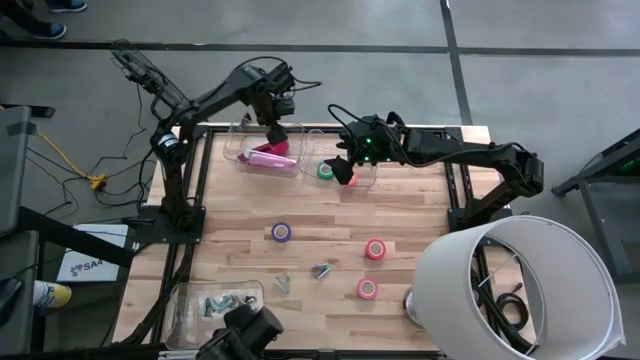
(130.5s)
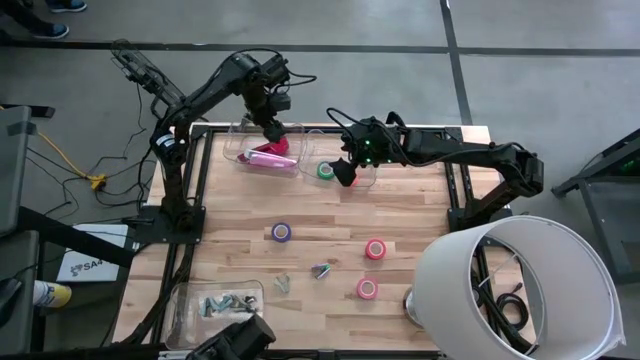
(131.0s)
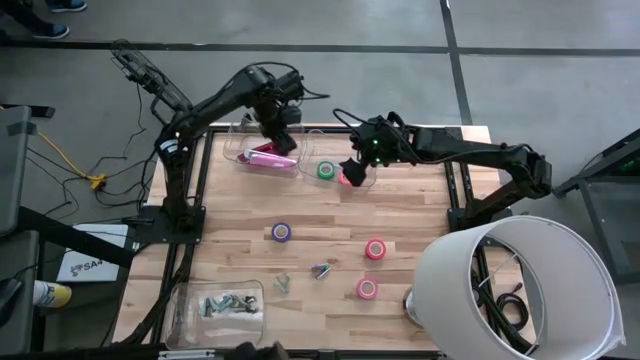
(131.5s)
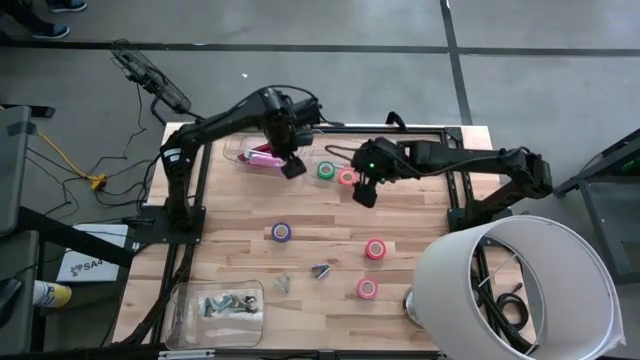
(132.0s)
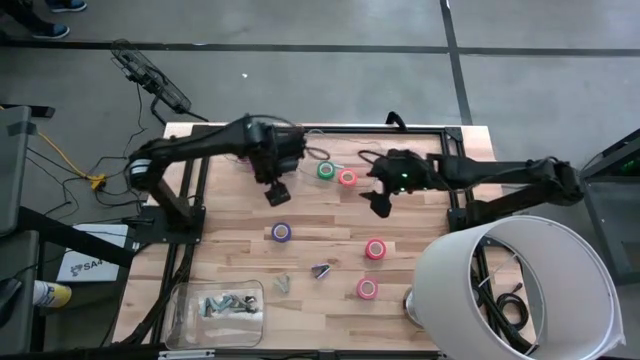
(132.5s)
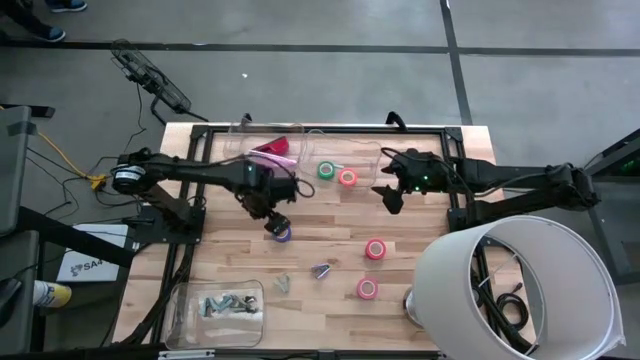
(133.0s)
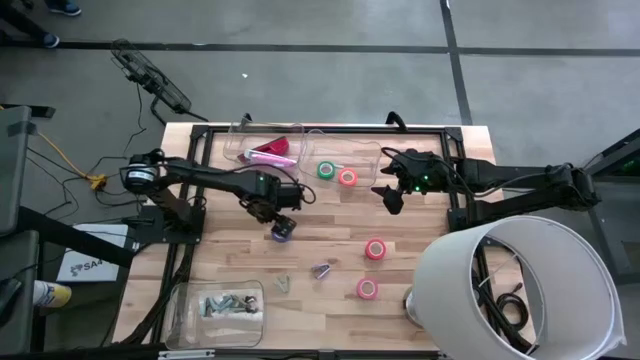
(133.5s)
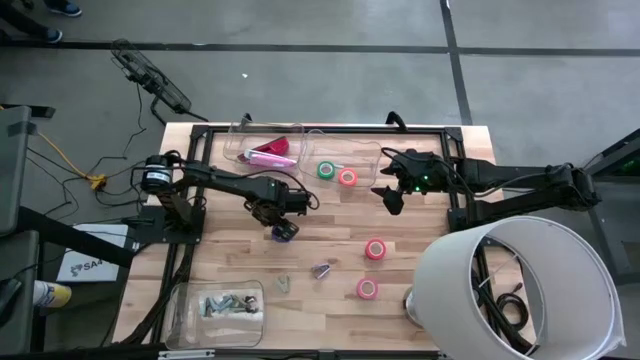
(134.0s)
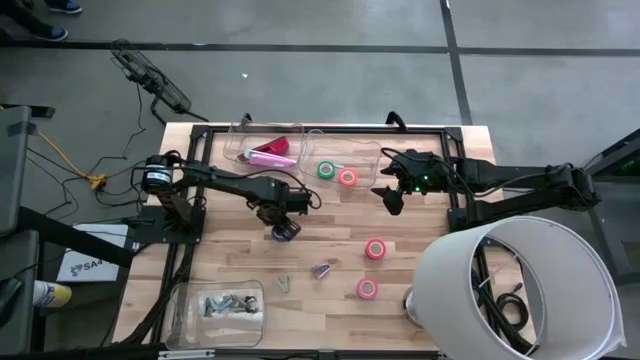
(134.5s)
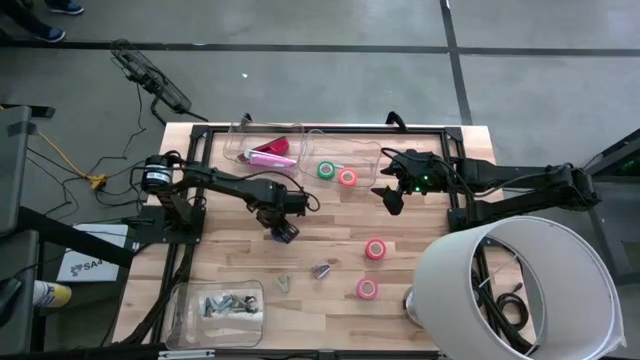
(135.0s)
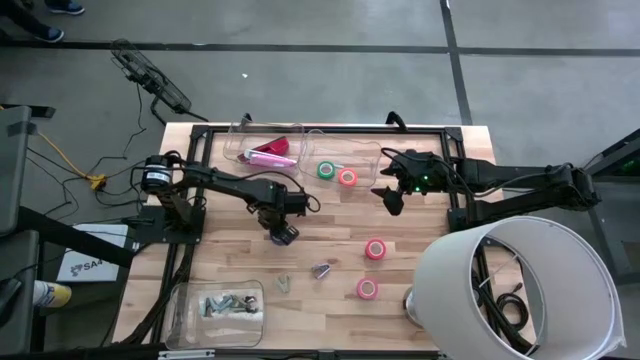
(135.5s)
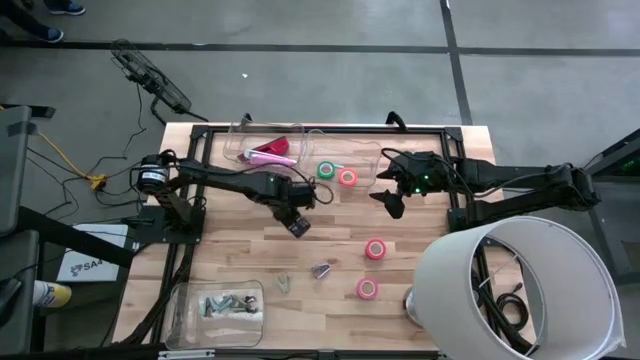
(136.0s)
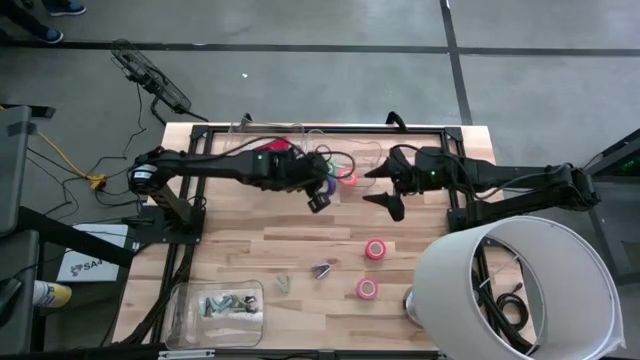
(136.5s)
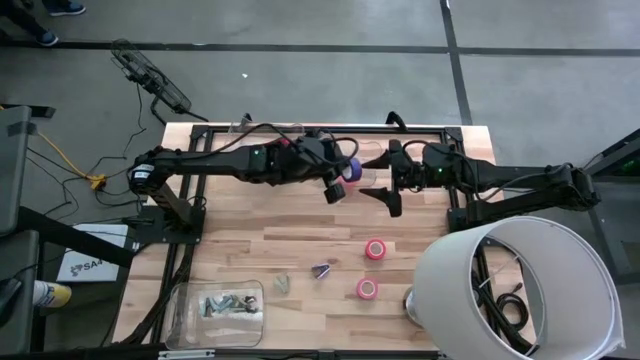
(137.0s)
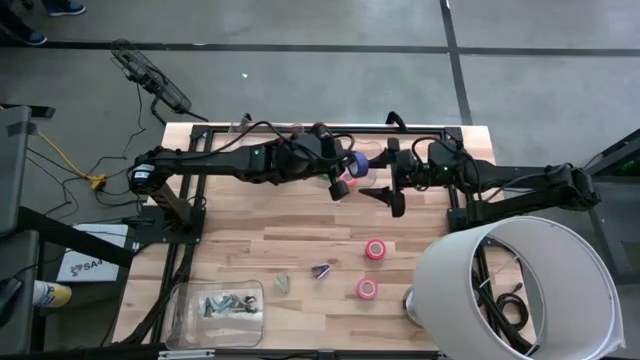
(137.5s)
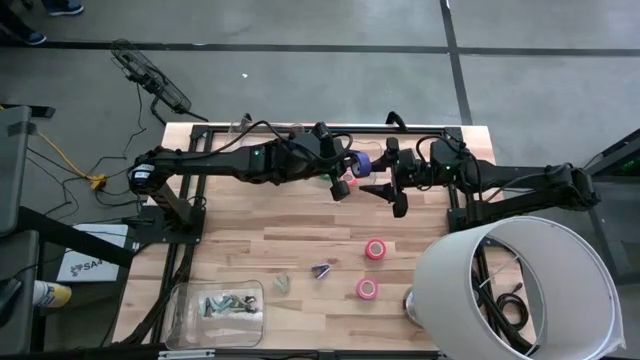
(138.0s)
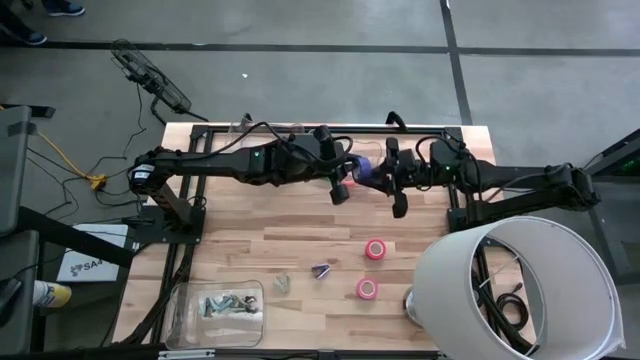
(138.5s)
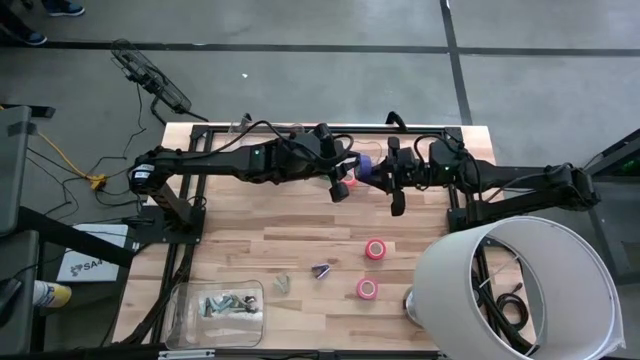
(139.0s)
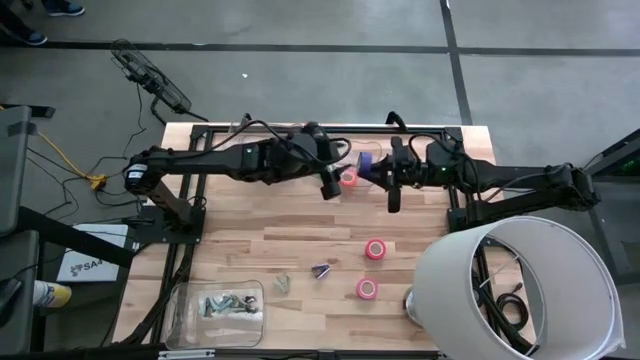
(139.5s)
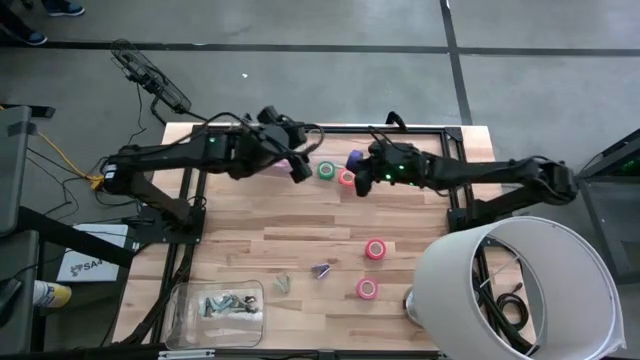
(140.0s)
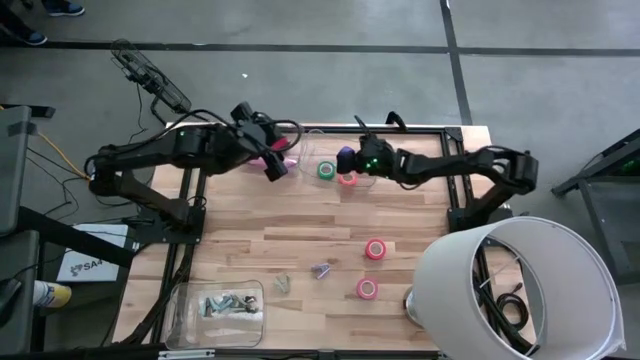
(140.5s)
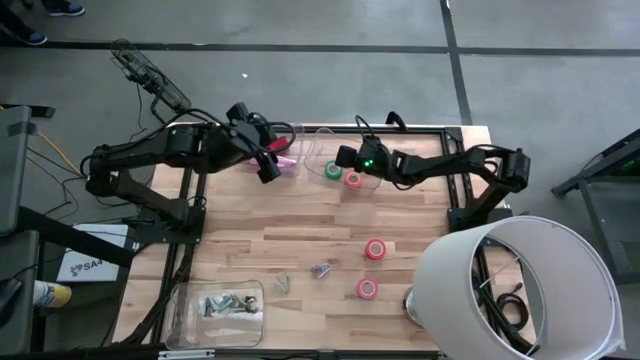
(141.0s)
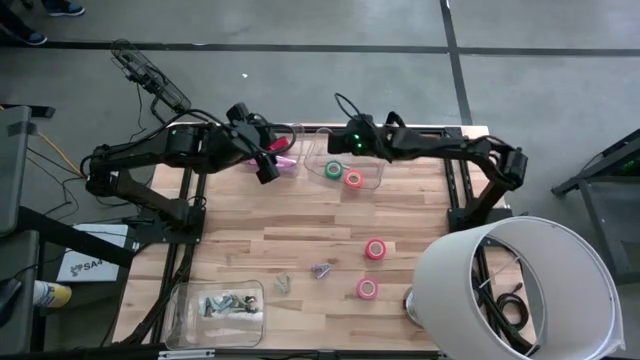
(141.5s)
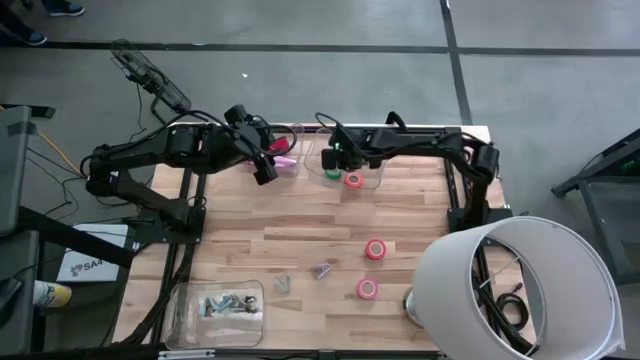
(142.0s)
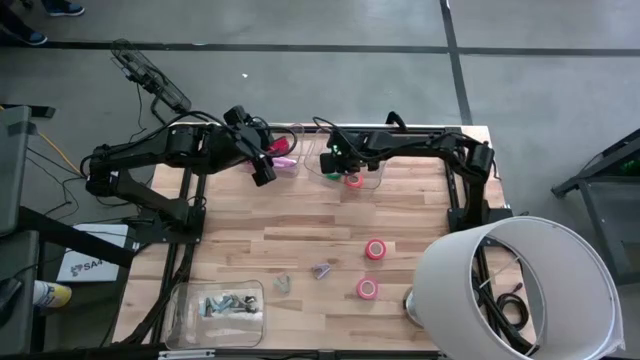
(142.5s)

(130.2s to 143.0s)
Task: Pick and place Stapler, Stapler remover, tape
Put the blue tape into the top right transparent bin

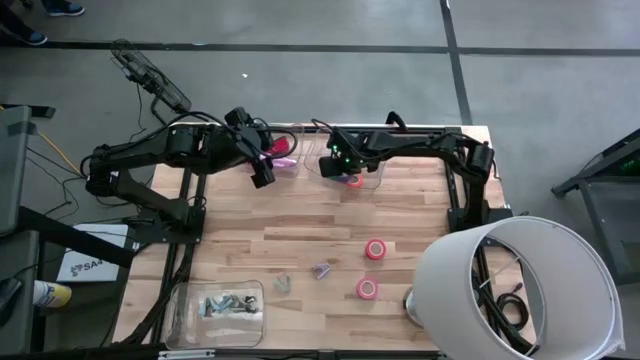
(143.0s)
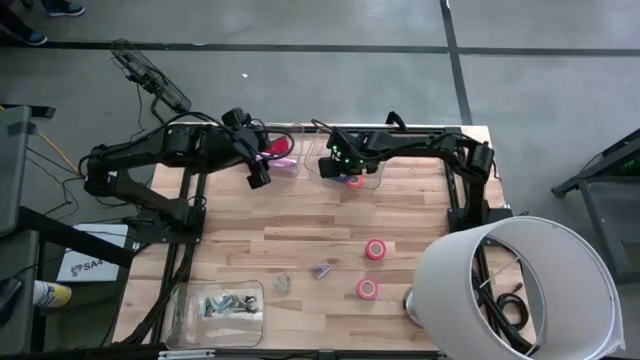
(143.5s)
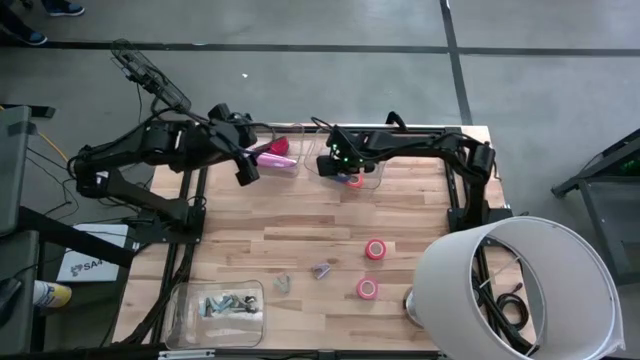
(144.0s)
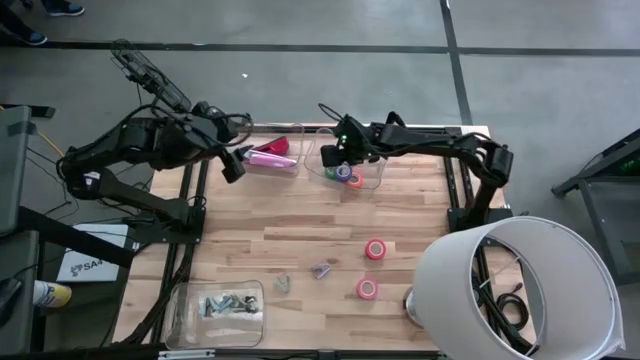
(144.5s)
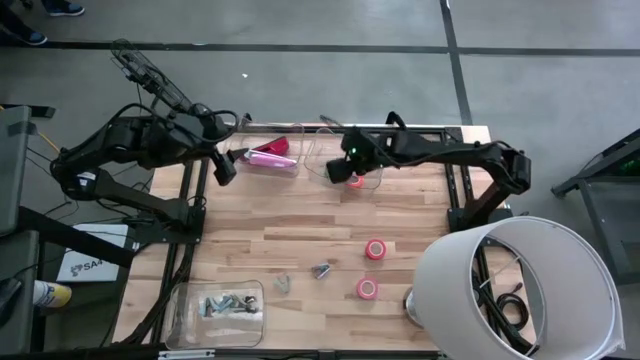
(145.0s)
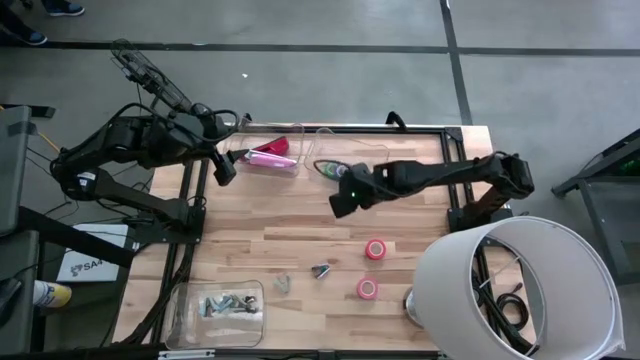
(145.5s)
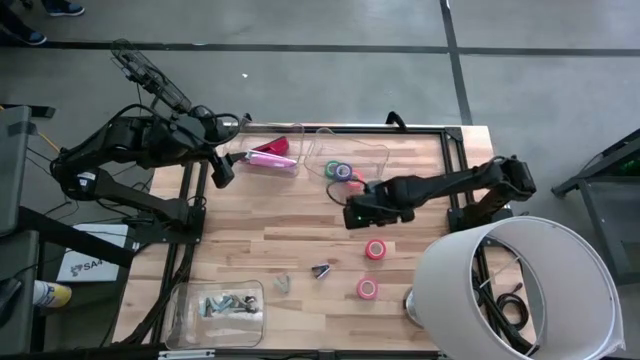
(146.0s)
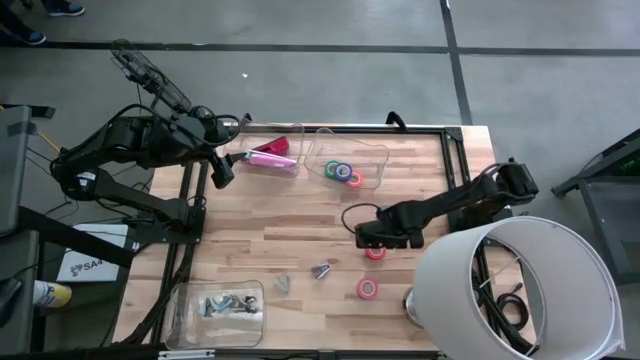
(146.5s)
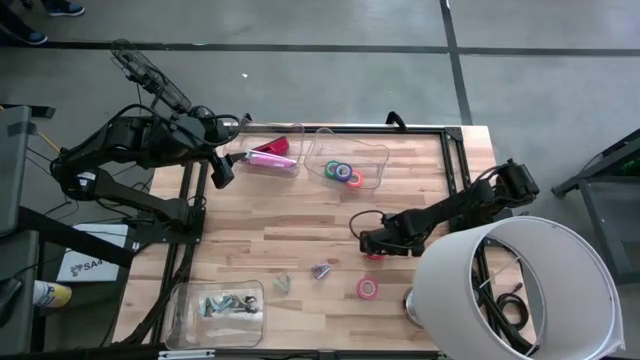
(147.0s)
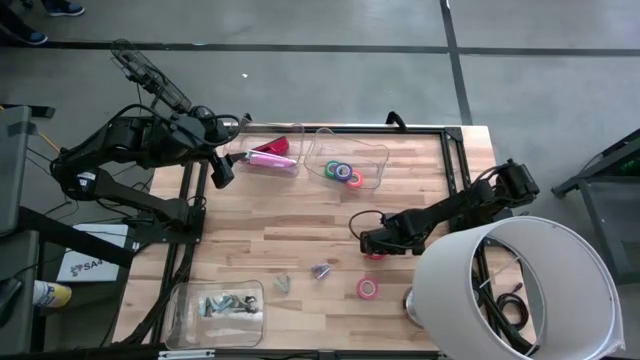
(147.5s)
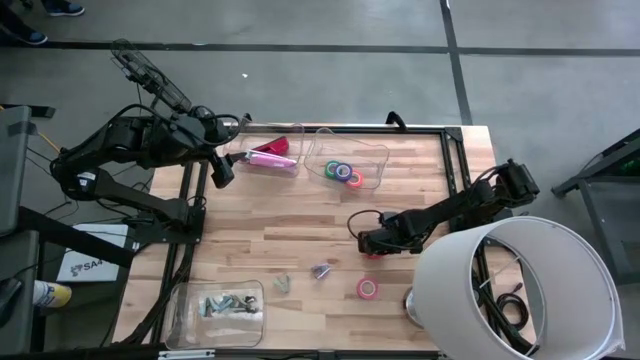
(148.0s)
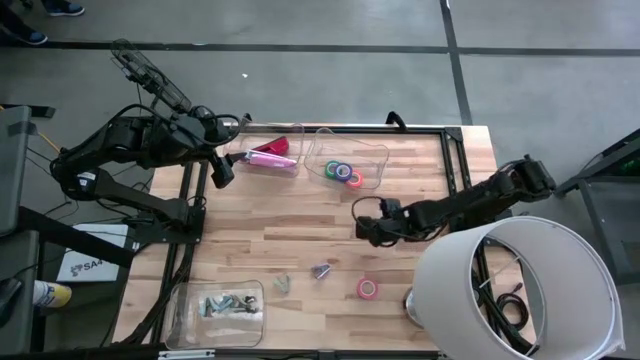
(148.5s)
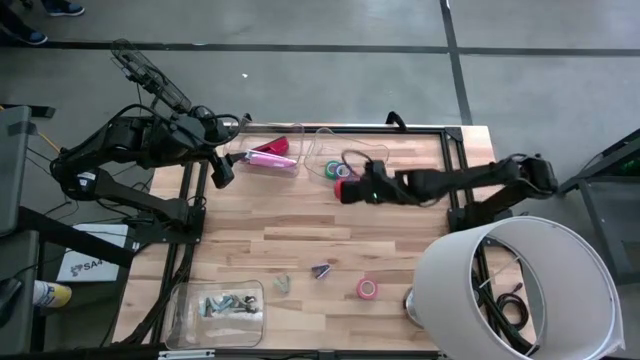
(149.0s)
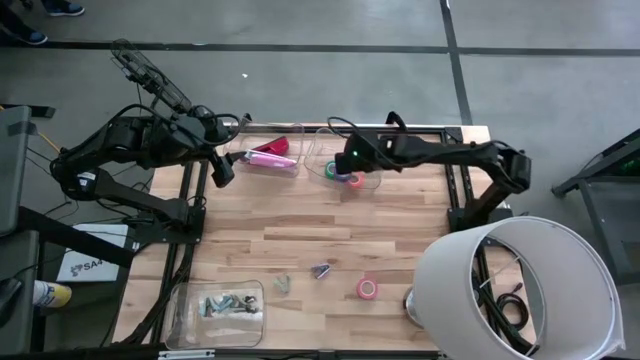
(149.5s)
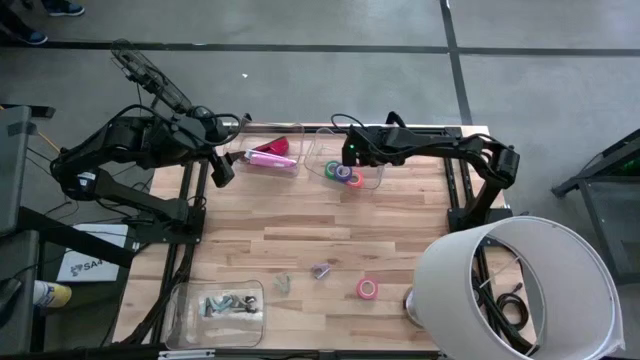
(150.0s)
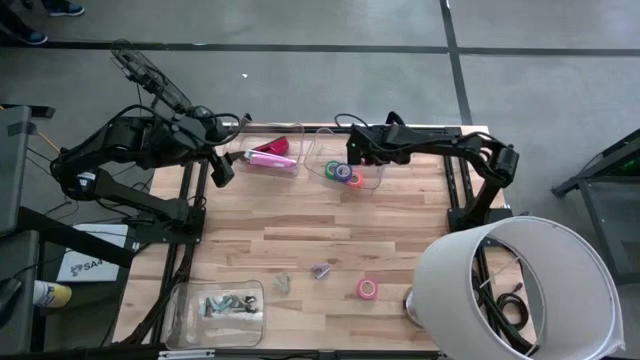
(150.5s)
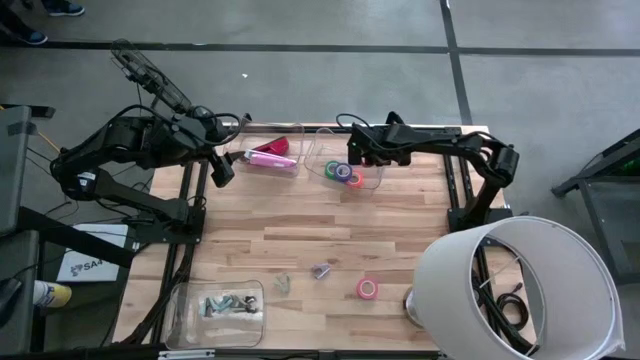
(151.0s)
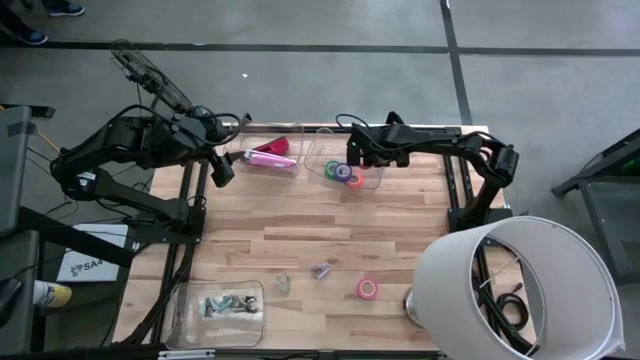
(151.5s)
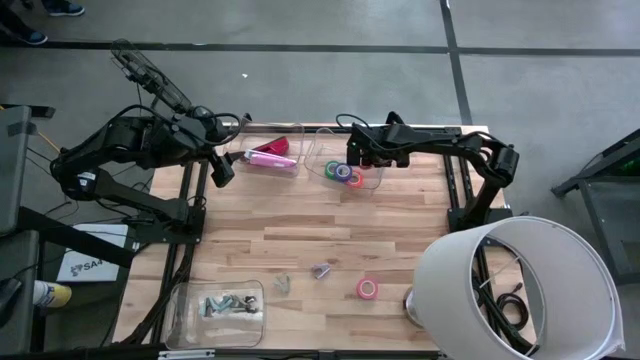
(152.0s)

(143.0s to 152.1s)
Put the red tape into the top right transparent bin
